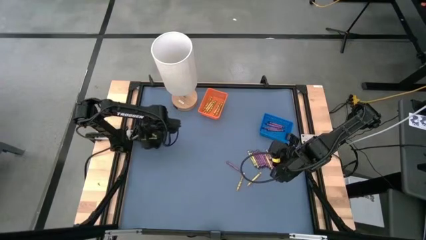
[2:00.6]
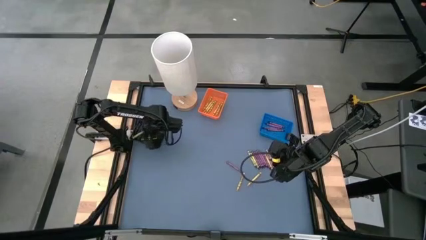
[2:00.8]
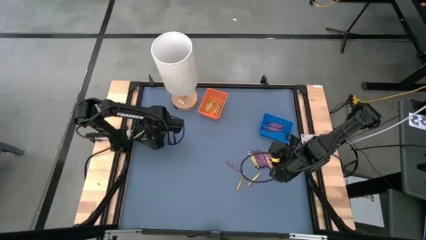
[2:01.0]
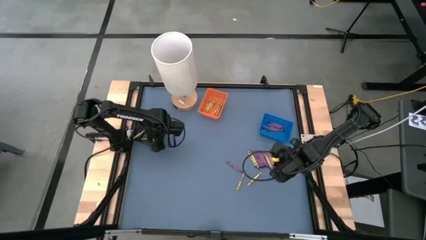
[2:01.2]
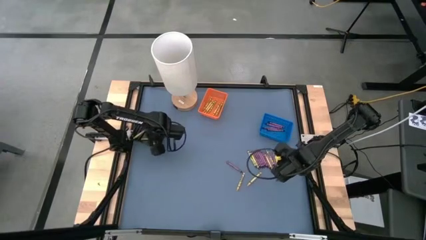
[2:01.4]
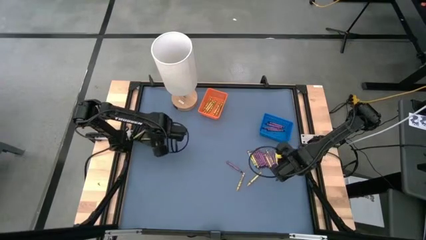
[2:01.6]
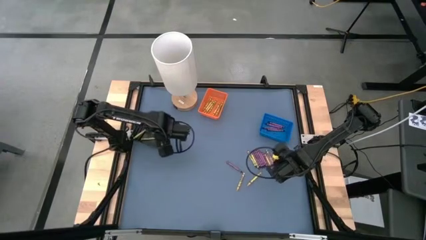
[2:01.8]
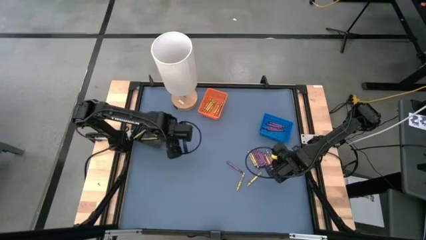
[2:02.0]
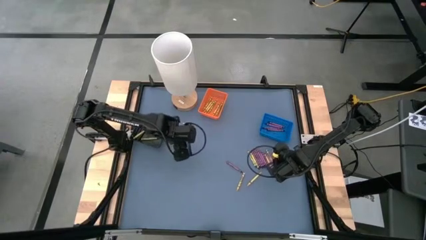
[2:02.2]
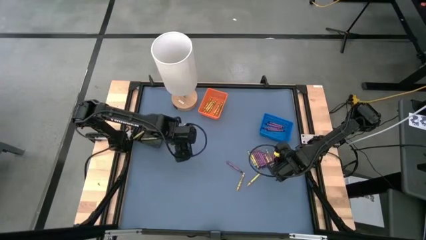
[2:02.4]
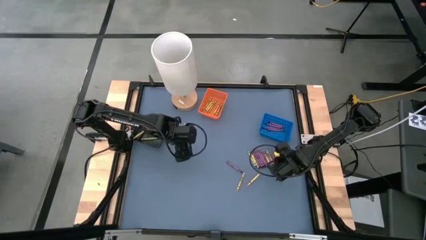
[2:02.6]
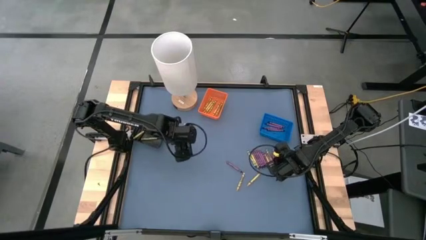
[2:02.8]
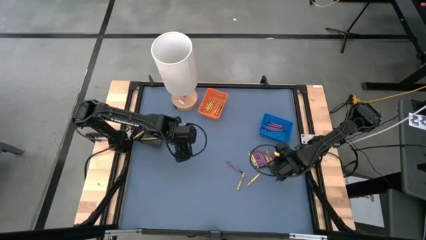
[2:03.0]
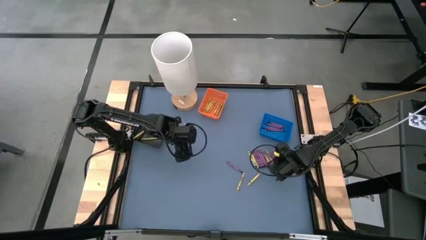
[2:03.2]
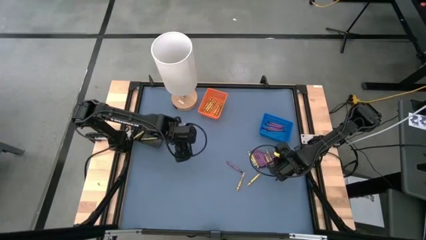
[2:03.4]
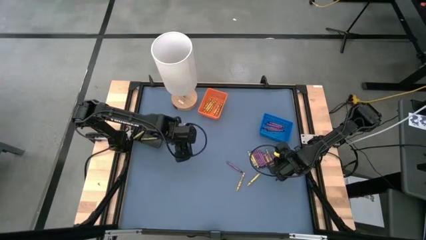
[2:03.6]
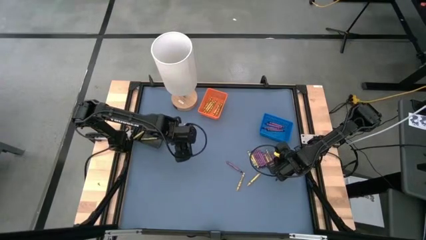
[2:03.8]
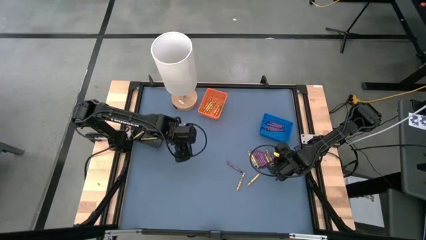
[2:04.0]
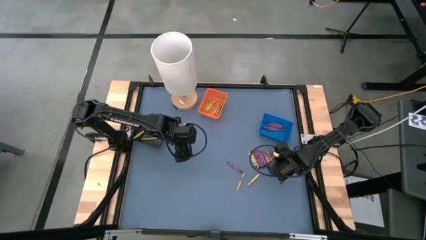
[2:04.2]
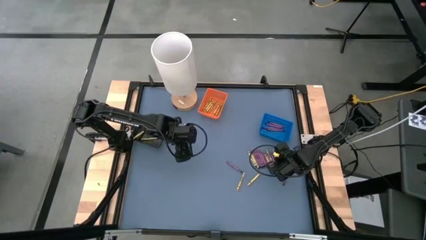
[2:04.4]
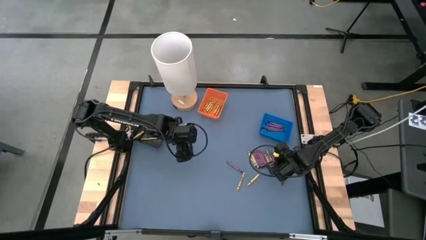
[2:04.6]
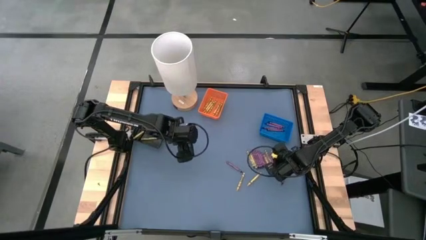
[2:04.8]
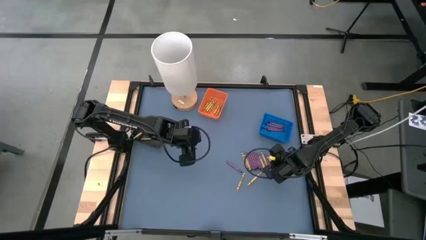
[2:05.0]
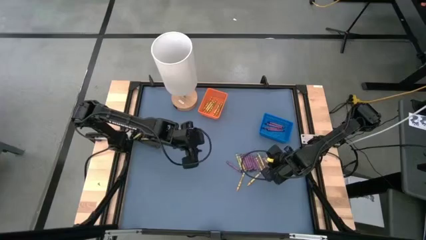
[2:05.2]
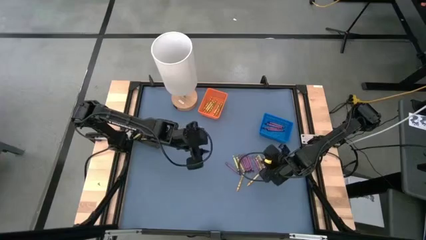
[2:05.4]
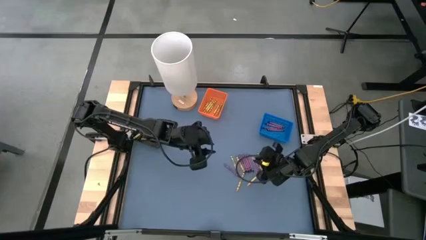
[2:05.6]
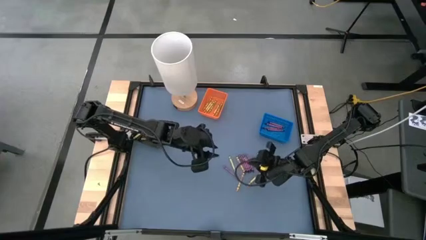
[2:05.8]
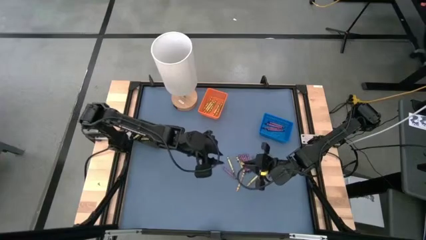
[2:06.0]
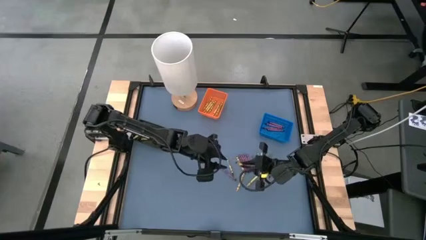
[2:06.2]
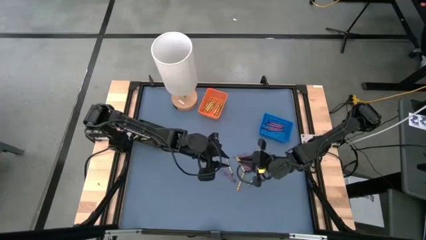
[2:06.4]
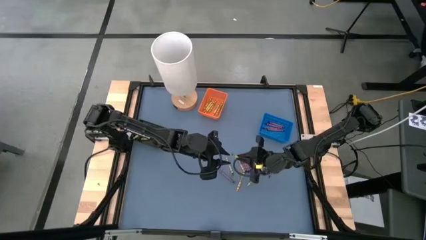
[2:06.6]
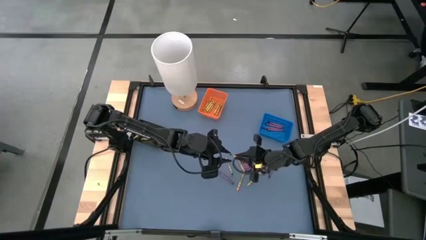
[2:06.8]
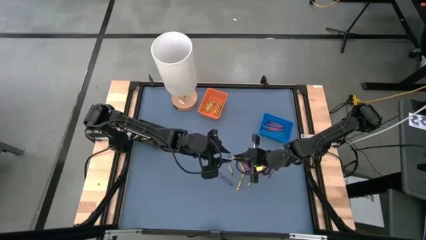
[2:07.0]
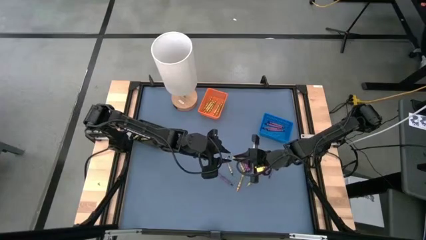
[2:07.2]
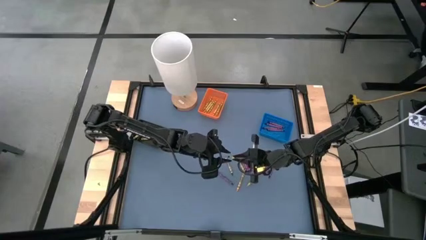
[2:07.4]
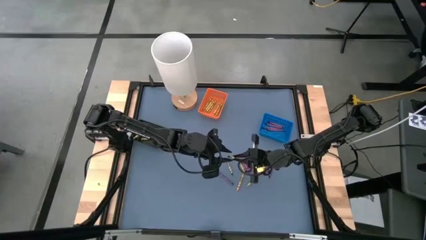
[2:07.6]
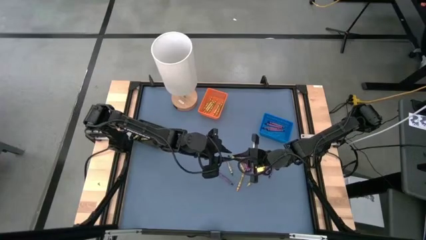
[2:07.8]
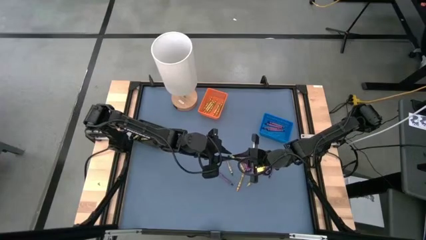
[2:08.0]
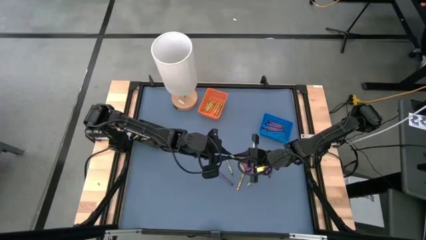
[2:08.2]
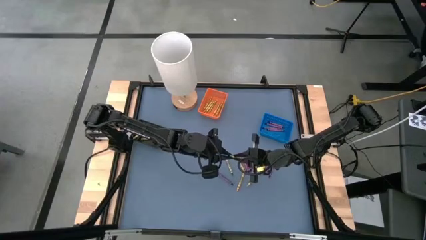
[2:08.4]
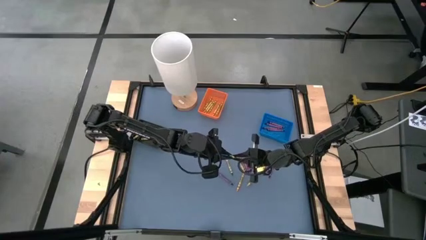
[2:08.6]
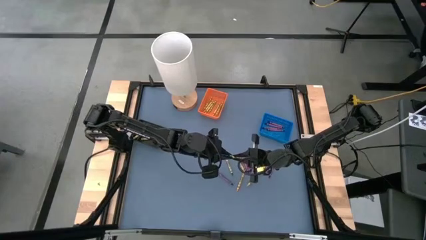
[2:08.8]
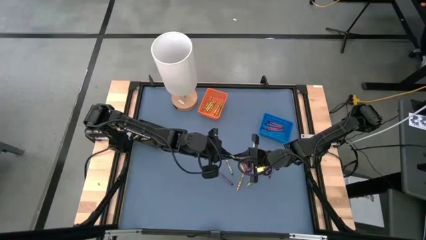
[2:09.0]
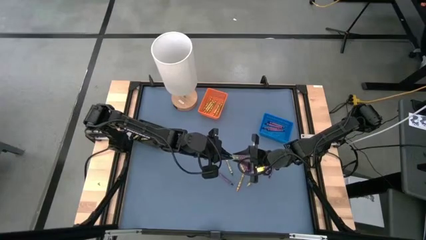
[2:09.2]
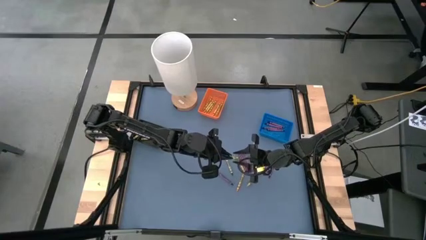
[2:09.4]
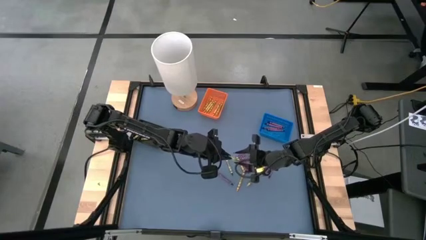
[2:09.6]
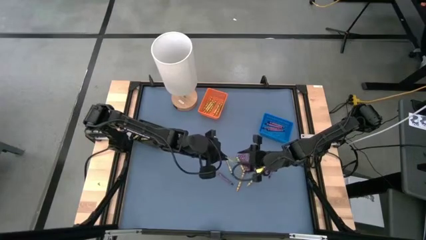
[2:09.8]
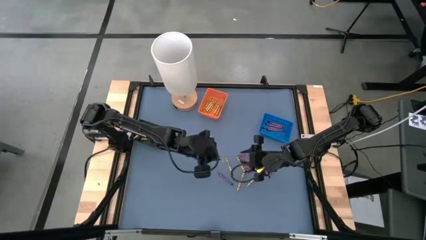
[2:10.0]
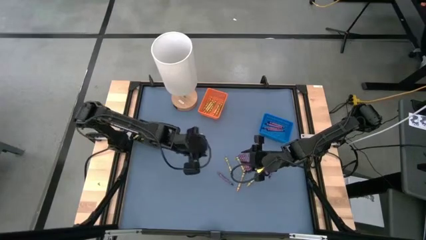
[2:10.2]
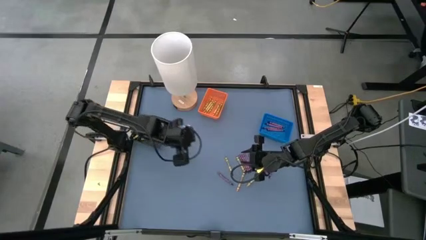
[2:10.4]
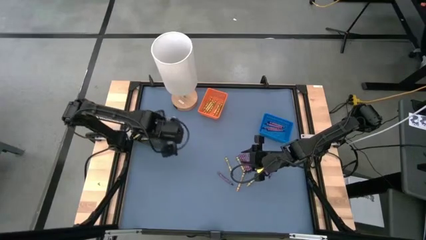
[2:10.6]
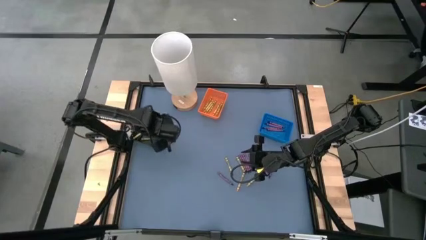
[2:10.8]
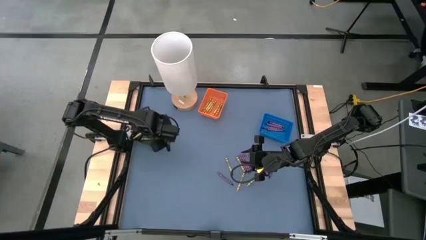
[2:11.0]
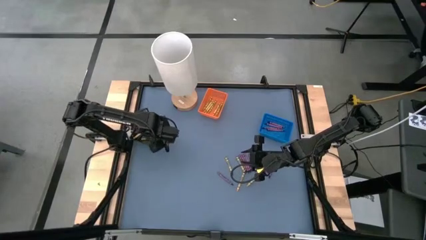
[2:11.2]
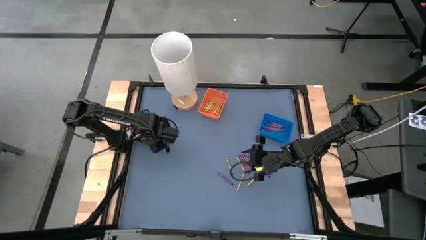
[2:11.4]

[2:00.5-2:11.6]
Task: Sort crayons
Put the green crayon into the black basket

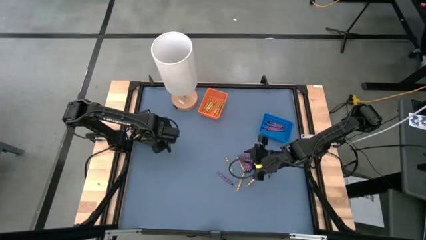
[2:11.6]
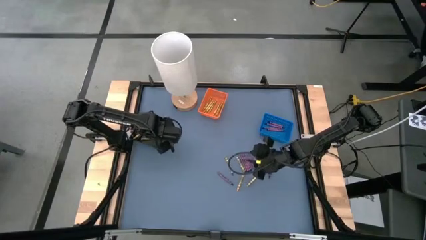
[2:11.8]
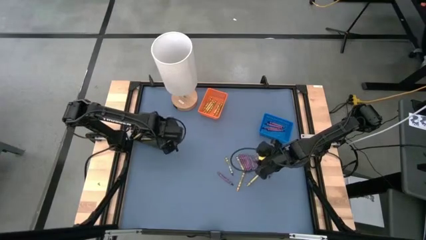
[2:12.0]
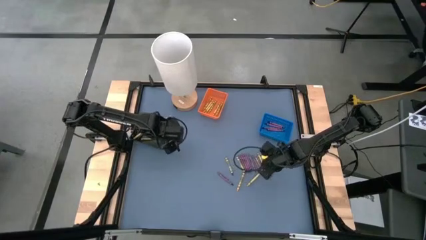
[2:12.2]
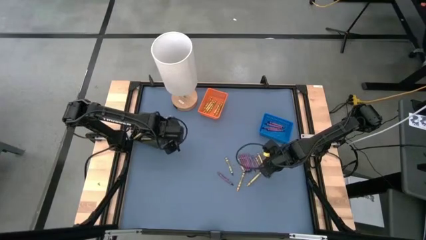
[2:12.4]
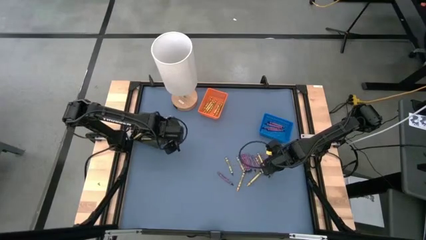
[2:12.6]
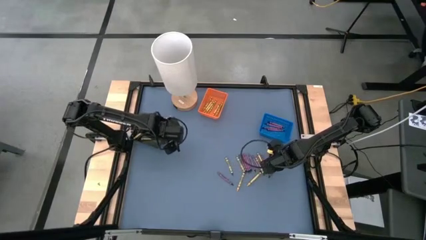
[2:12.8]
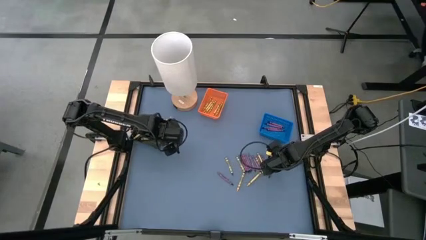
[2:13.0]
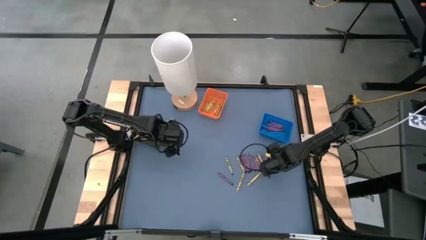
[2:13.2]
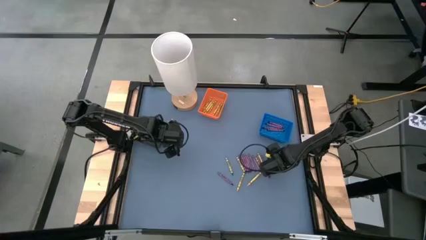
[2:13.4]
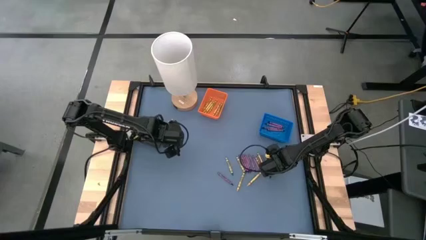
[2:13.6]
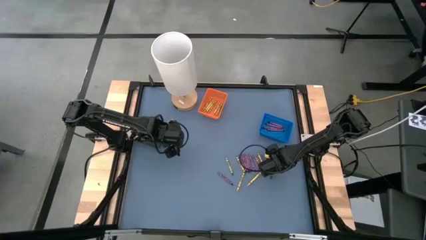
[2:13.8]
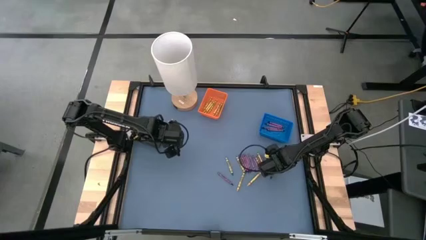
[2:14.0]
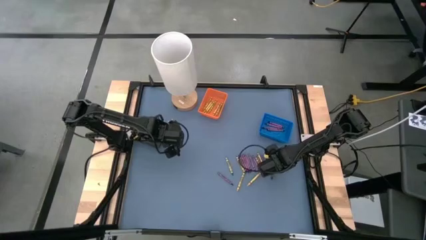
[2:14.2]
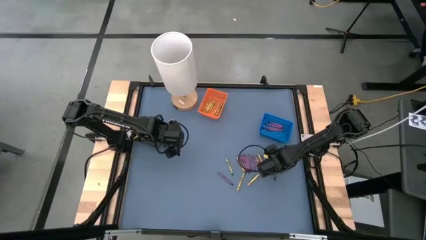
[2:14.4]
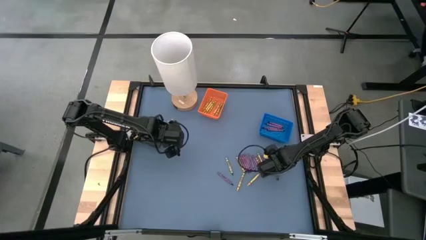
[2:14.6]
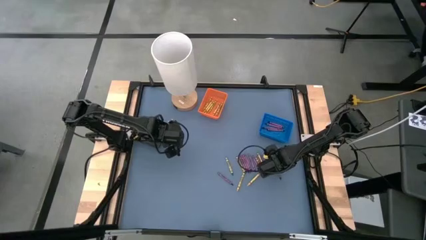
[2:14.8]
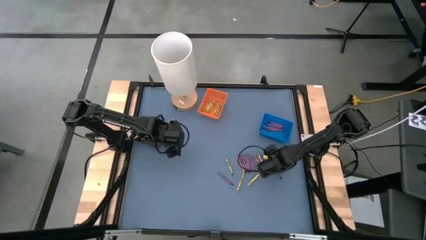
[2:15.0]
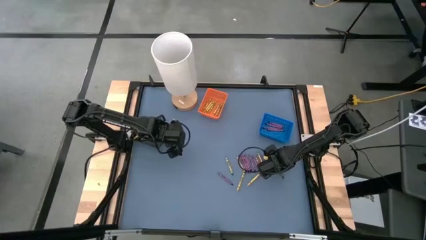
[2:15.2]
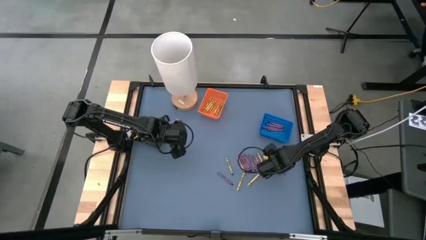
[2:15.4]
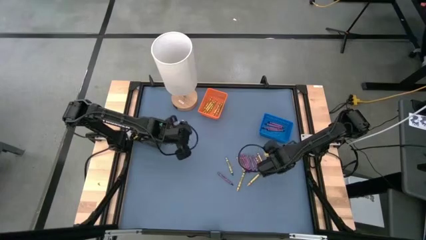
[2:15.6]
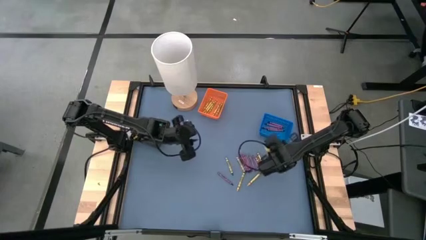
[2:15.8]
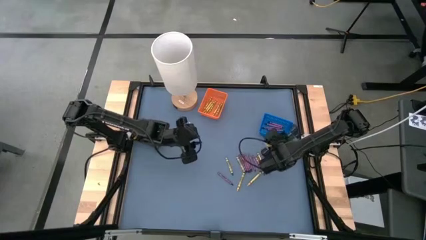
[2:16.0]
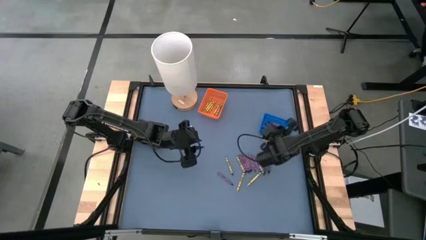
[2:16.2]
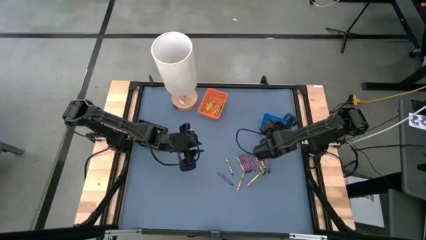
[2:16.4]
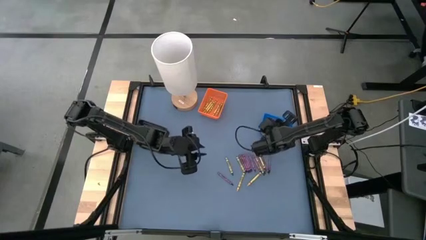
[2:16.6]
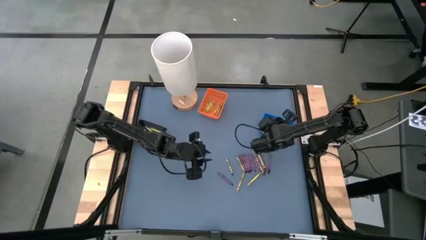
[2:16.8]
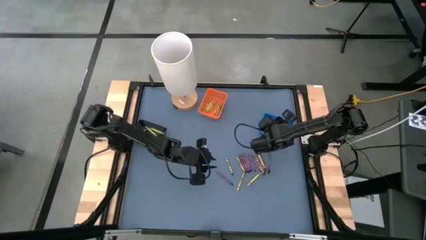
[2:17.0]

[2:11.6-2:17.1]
Put the violet crayon into the blue basket
